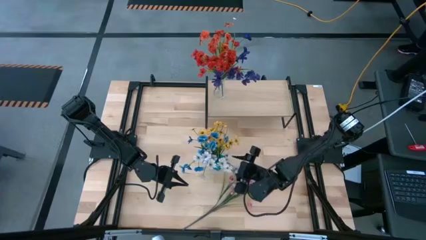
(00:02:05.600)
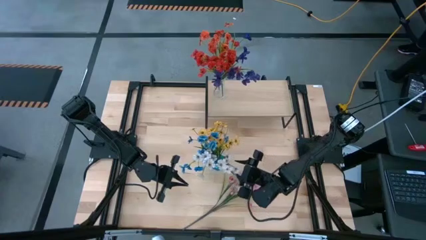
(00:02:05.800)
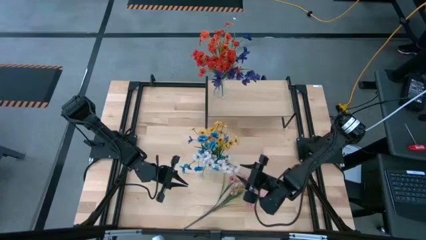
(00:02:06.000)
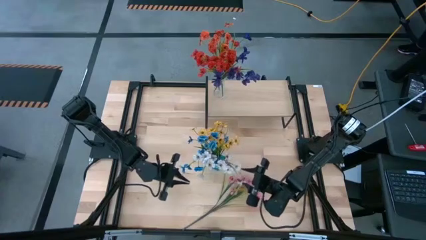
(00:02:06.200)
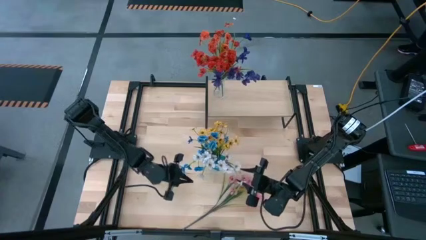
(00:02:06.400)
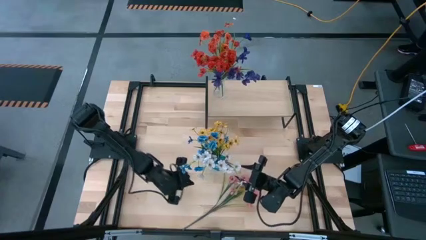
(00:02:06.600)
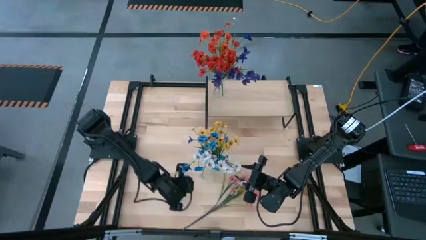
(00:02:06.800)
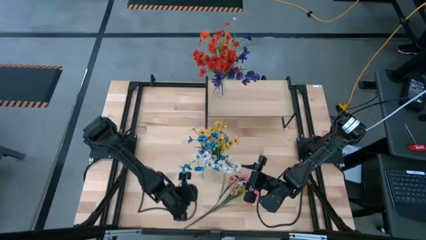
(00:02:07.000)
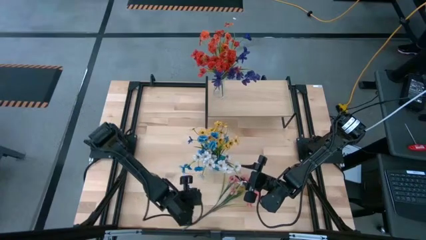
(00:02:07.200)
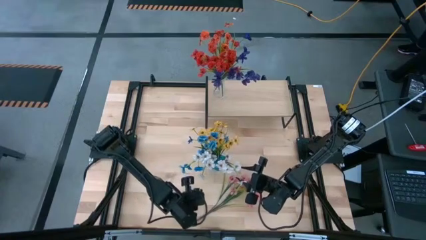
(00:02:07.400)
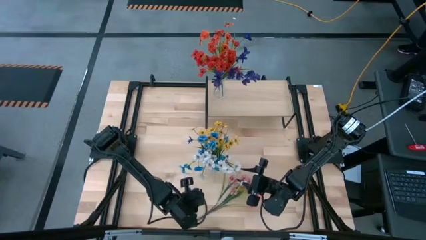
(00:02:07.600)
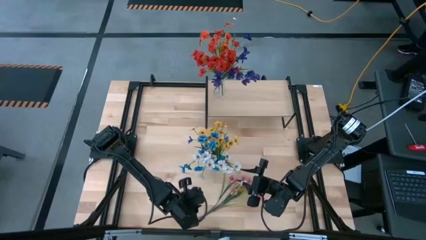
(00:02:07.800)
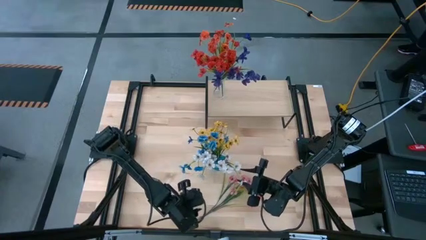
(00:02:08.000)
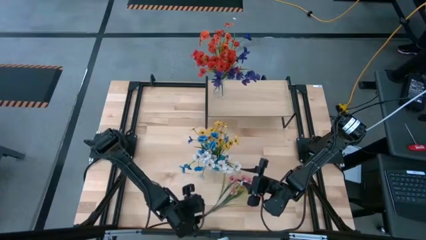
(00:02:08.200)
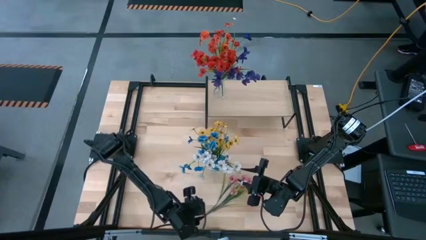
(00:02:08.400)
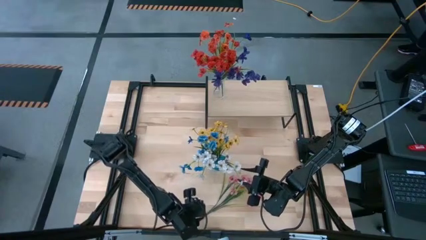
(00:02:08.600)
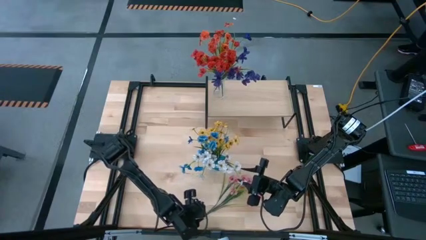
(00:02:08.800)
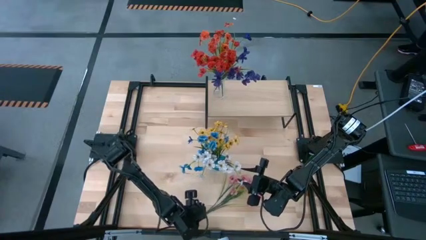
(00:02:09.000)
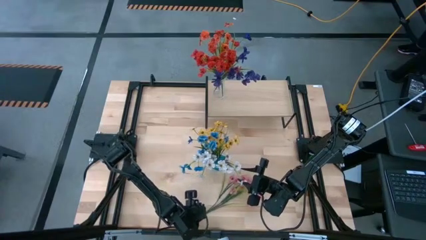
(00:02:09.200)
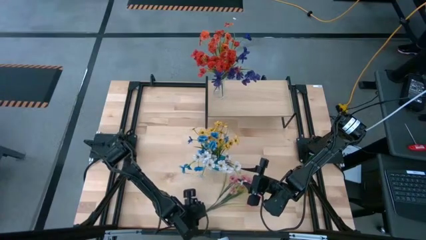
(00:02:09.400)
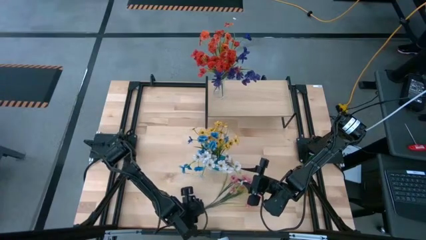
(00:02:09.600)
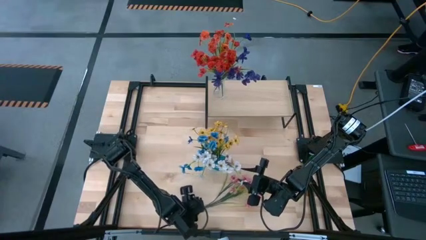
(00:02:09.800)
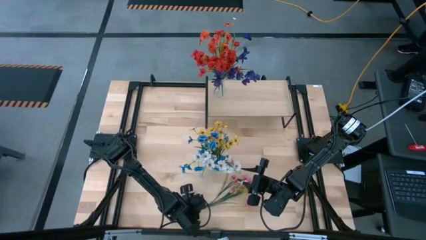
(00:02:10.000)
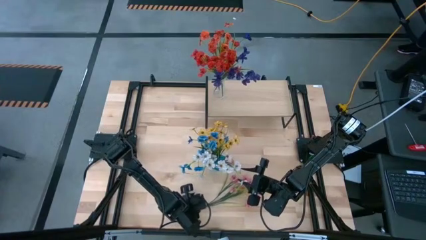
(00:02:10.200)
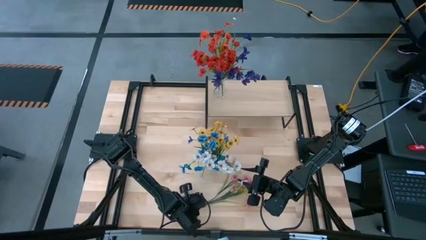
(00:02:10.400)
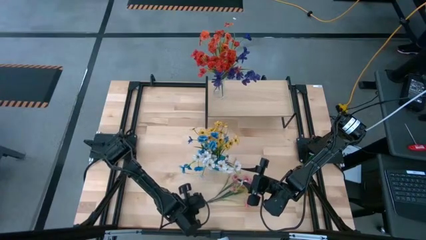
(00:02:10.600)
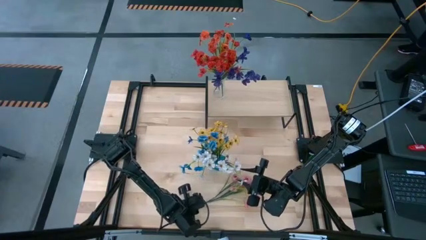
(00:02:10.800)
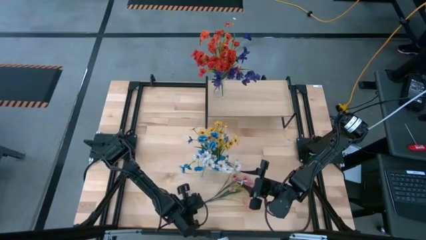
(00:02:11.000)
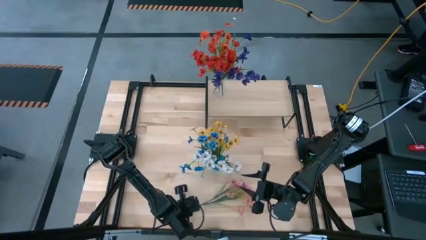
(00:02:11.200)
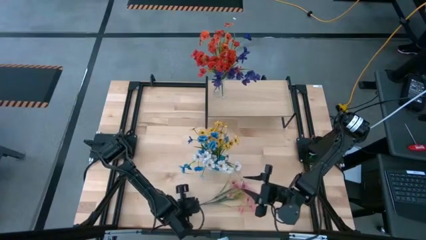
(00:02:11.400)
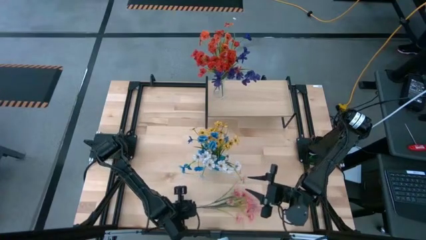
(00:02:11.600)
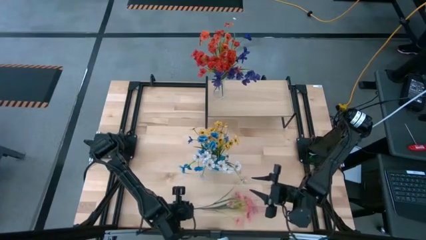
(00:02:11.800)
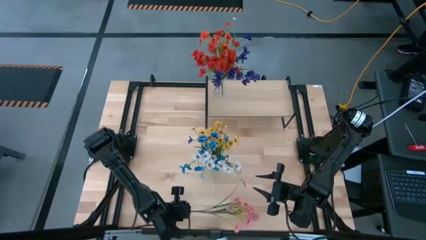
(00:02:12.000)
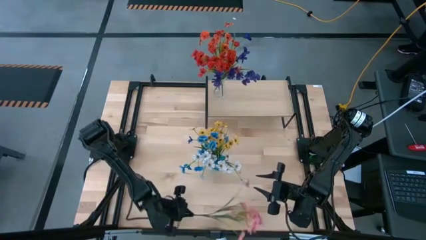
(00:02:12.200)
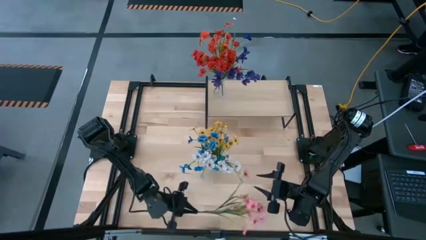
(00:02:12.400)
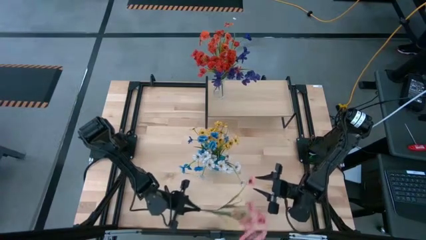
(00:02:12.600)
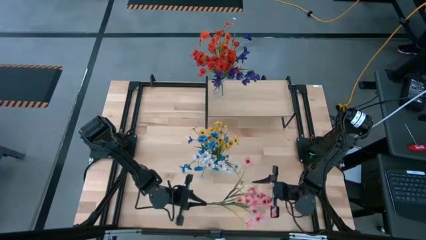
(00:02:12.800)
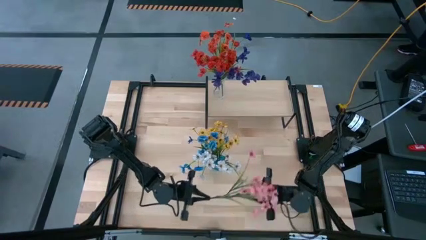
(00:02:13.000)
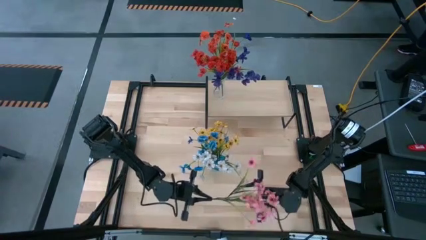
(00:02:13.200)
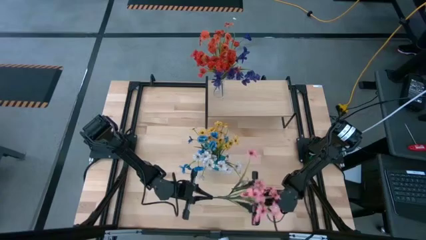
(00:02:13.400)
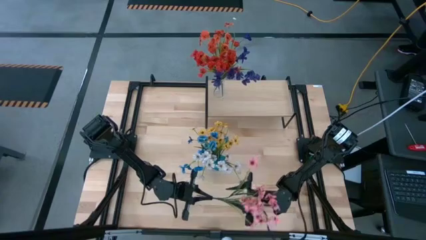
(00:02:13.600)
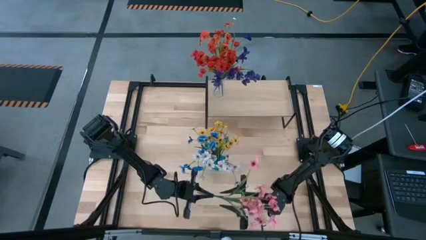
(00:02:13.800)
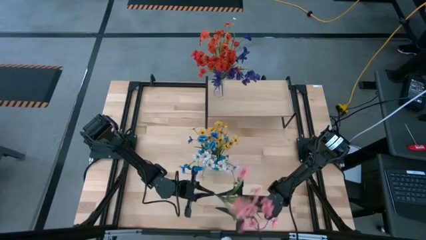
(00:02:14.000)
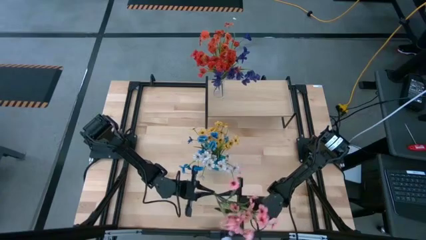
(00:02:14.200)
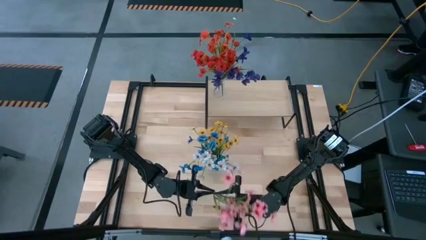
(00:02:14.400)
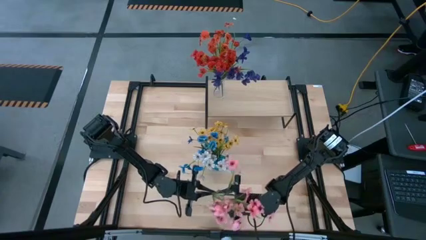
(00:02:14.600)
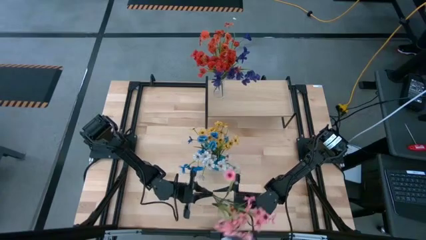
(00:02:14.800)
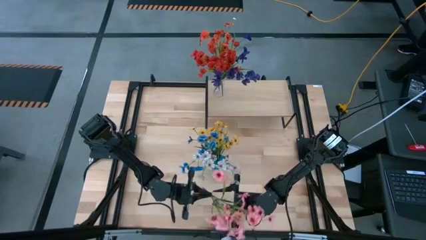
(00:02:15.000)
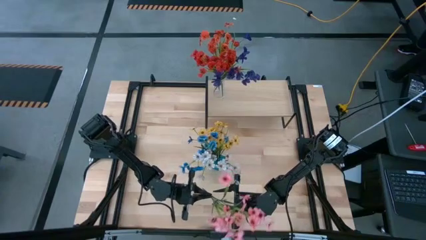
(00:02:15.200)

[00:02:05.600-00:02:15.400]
Task: Pick and place flowers into a vace then onto a shelf
Put the pink flowers into the blue vase
